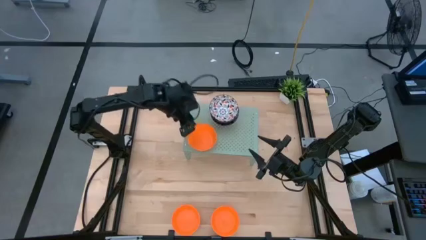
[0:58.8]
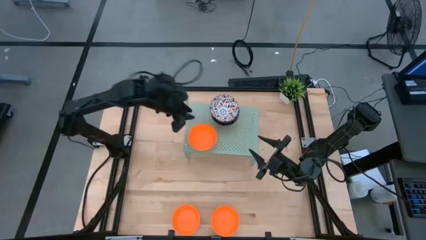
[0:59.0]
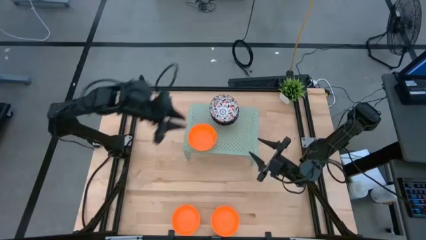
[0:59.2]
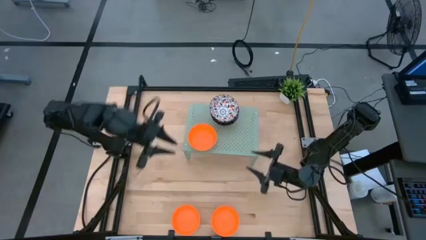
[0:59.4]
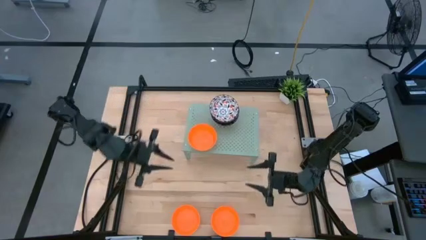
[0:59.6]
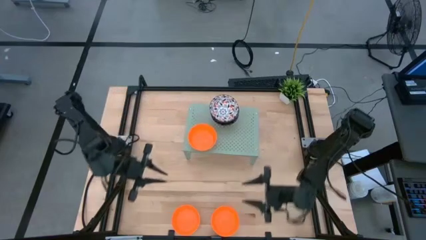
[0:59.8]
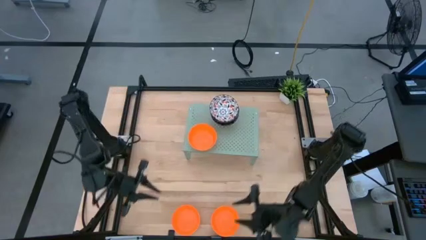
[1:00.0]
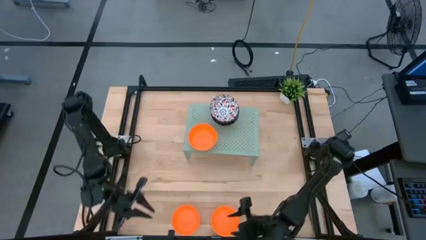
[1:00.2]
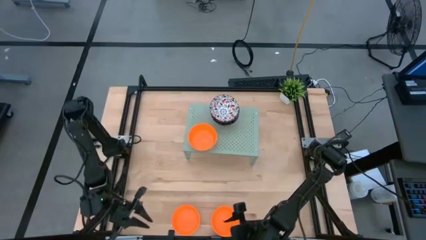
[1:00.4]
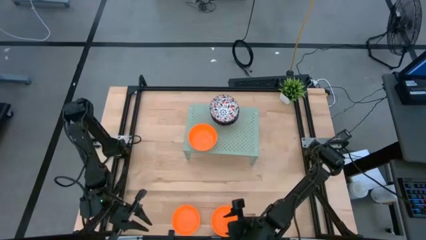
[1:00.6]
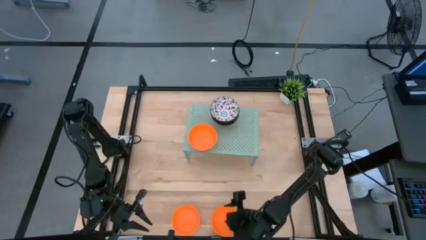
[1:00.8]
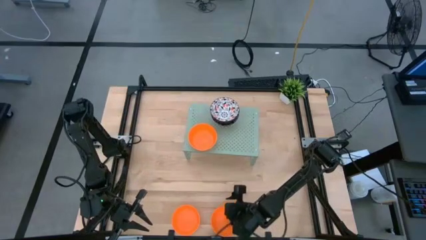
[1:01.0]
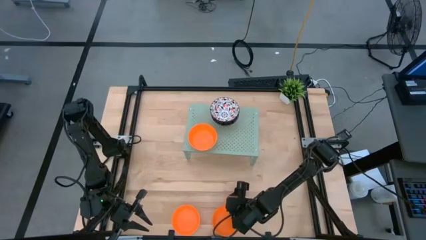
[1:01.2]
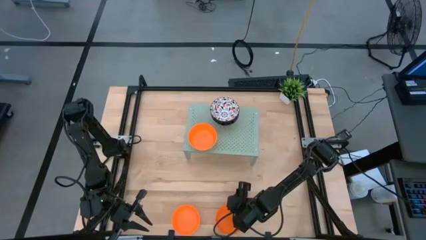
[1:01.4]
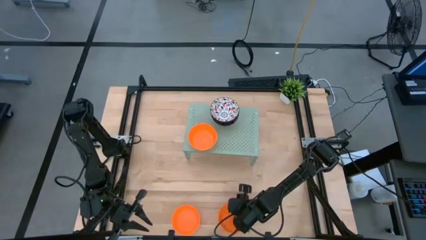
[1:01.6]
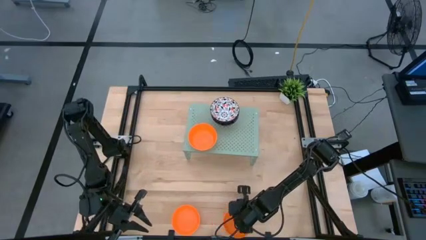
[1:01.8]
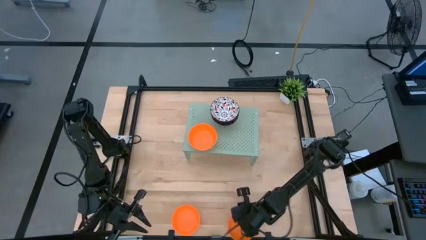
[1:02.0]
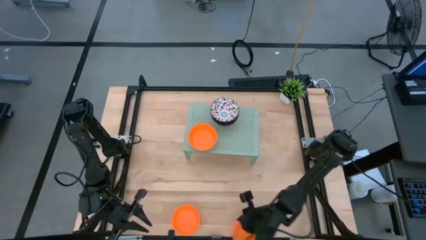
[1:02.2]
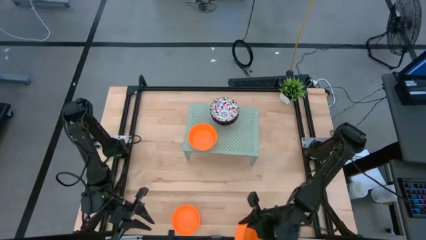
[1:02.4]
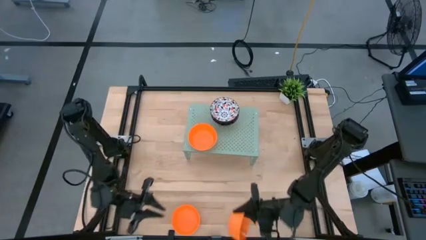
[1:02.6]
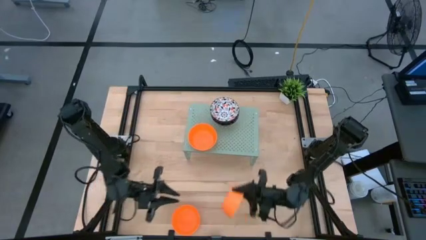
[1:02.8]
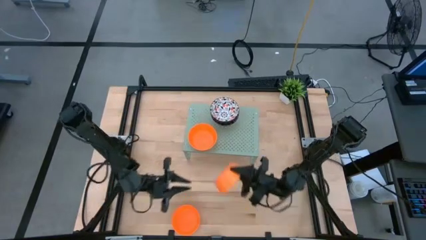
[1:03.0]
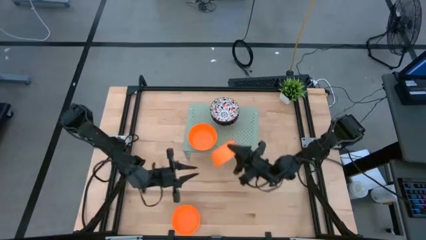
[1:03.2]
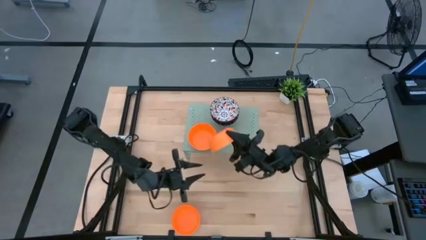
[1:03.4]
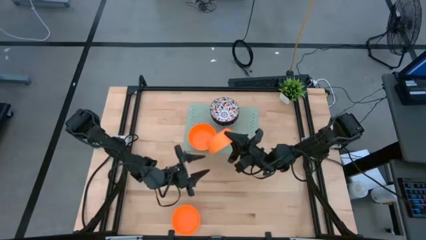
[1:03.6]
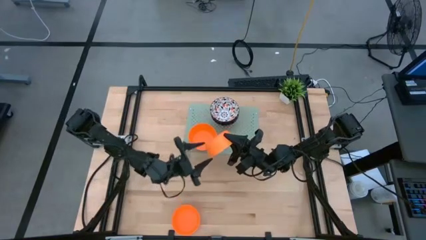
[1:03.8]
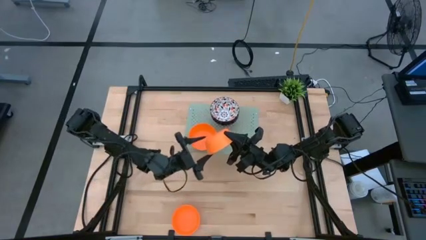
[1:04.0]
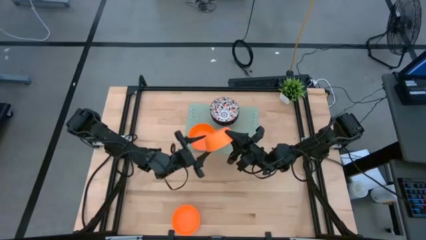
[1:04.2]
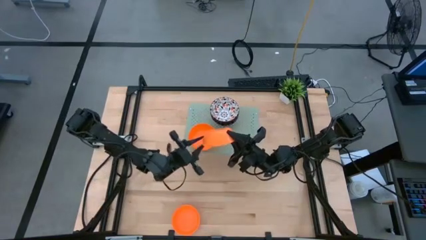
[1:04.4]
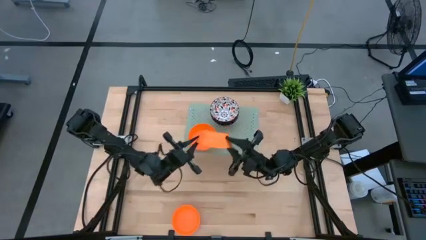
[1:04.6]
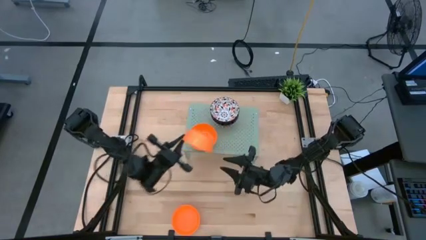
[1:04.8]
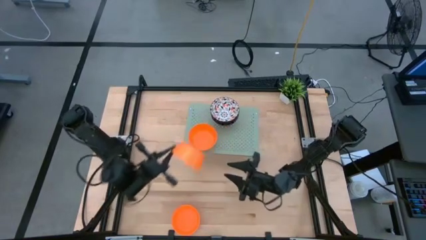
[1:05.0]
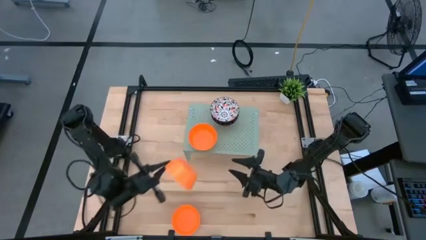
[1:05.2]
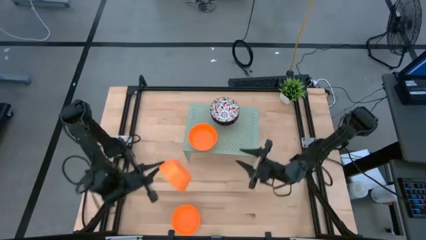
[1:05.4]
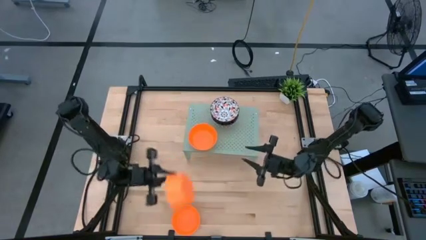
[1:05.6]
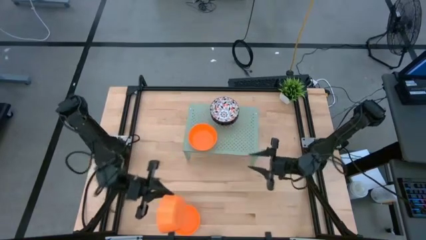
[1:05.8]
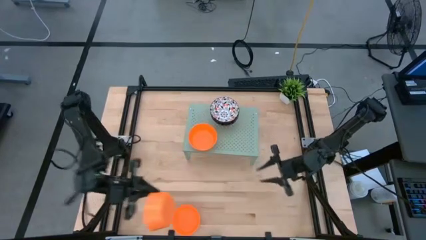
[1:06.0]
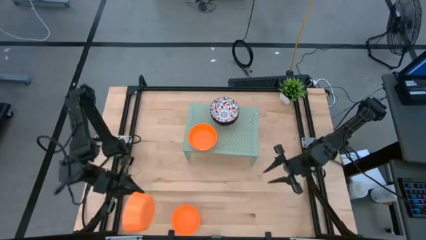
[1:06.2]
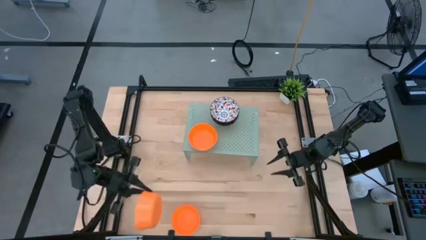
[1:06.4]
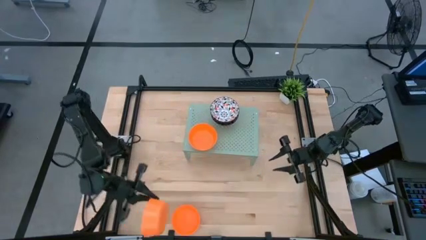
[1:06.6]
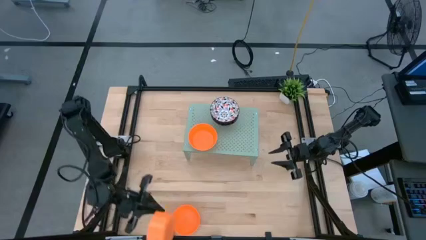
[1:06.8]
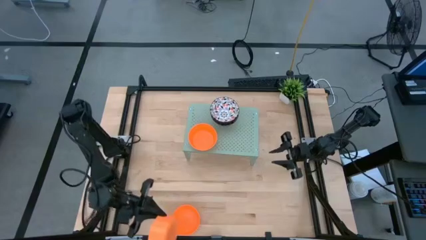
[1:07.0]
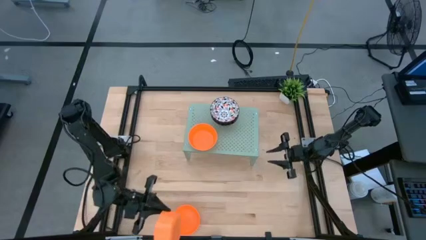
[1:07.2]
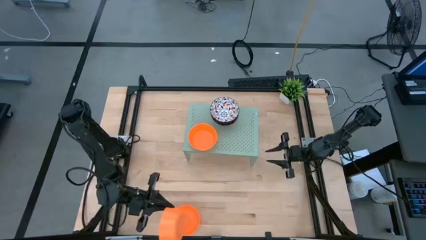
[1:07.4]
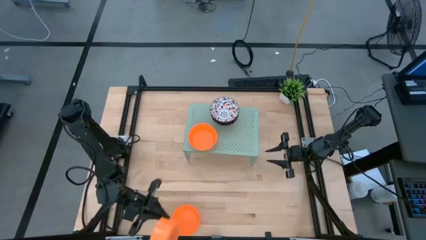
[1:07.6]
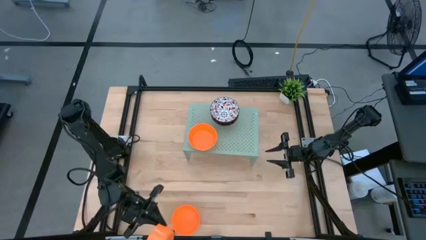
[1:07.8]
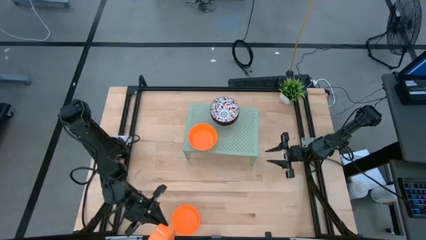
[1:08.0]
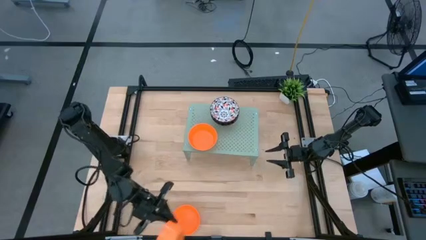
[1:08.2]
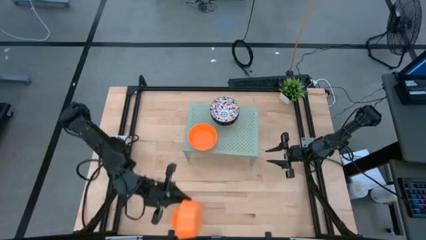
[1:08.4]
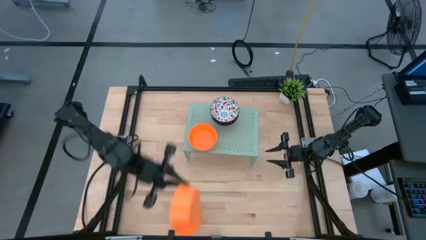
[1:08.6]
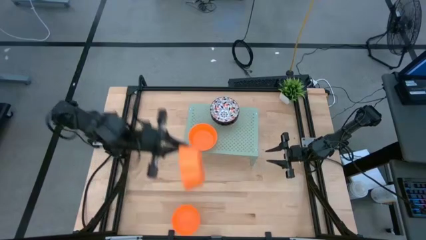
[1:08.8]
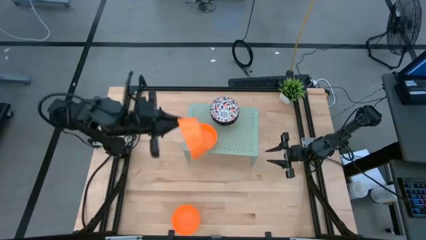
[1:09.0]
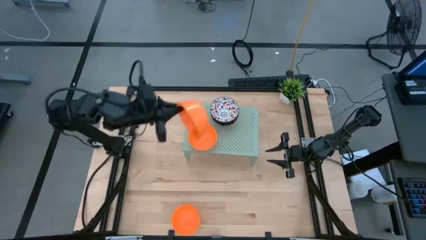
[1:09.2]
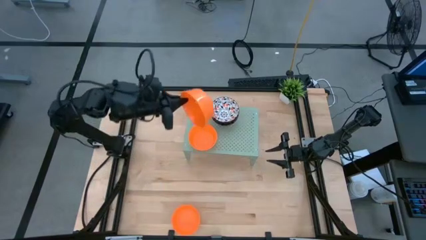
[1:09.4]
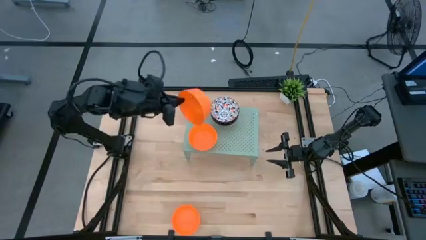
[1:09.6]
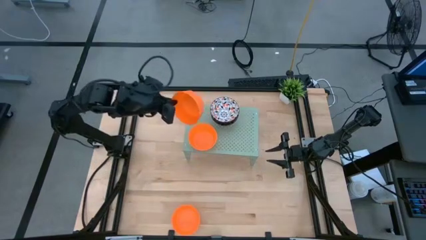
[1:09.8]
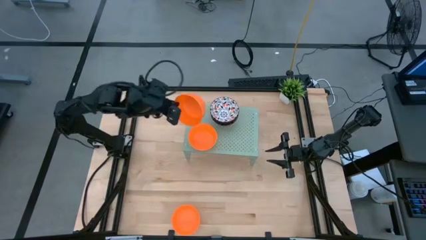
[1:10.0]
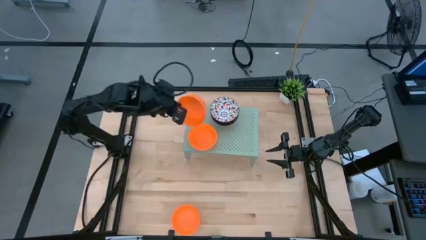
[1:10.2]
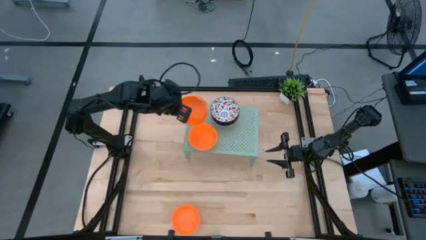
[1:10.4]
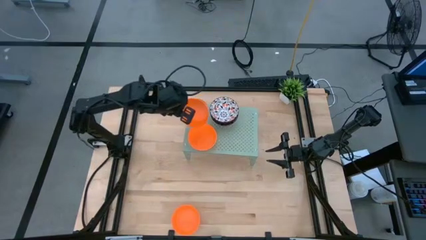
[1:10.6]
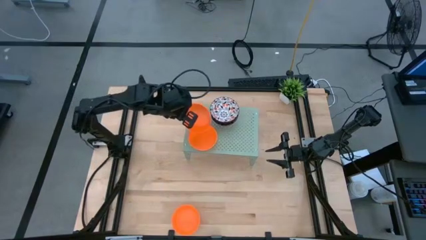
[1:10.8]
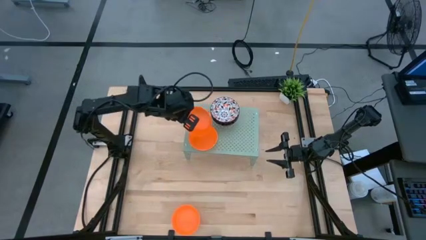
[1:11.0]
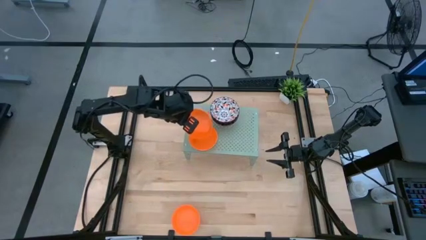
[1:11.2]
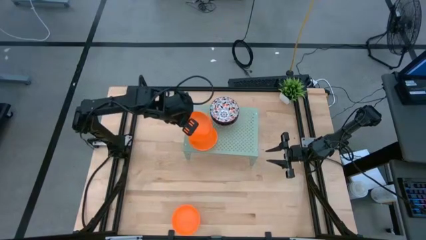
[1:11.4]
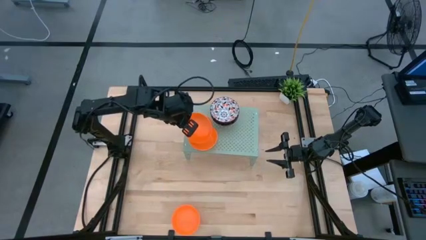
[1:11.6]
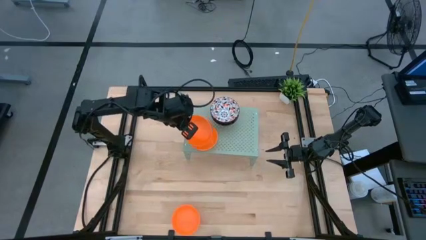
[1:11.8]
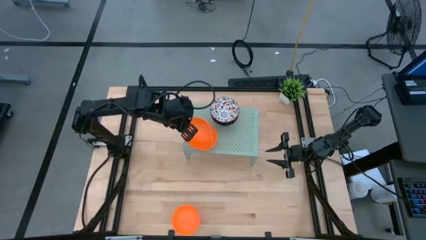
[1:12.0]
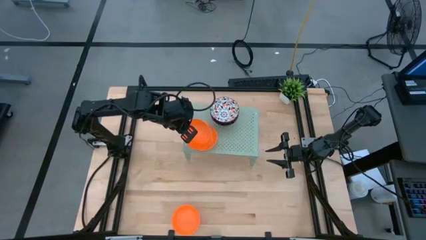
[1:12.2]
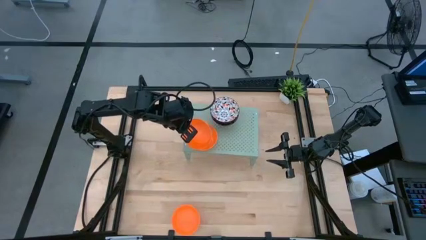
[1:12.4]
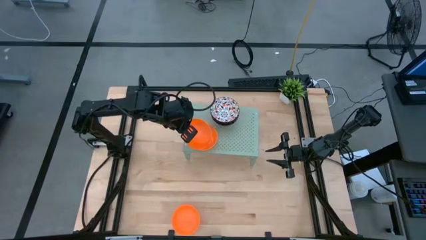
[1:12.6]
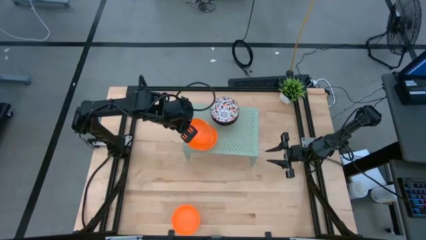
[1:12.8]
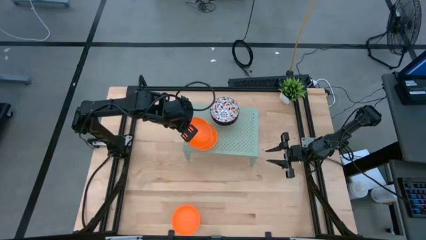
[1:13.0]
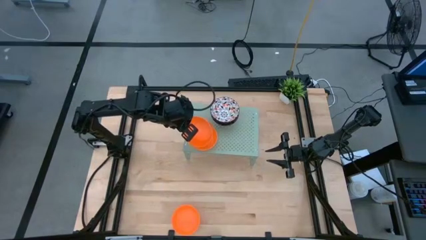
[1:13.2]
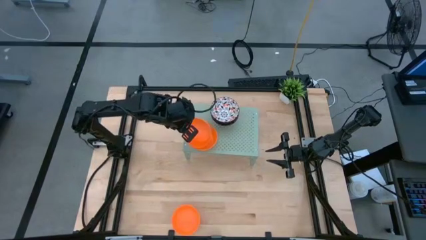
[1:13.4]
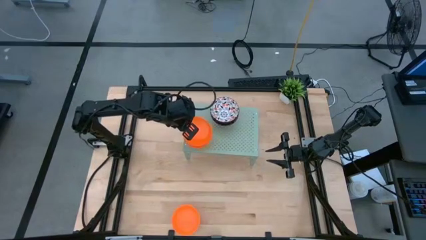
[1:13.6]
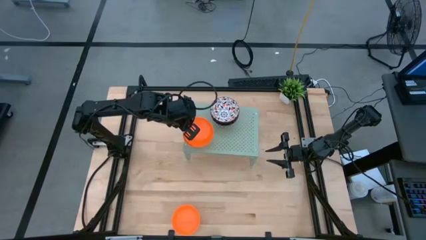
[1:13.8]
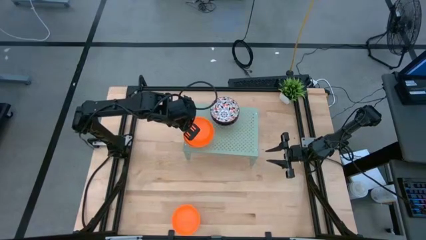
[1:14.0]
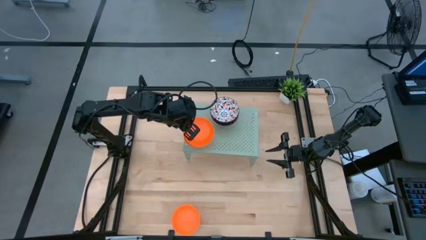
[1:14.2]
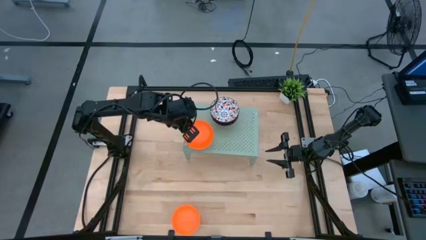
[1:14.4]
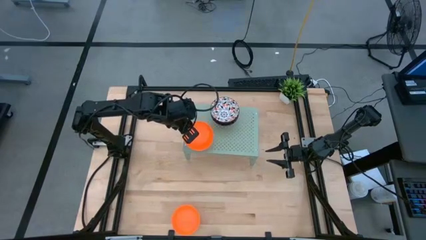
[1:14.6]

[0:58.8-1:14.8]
Task: Pick & Place Mini bowls
Stack the right orange bowl on top of the orange bowl on the shelf
